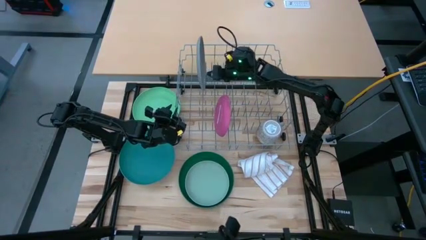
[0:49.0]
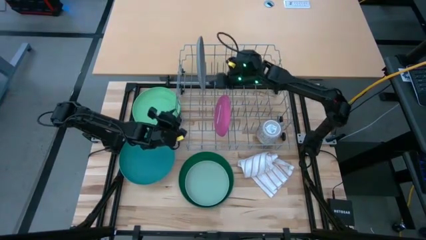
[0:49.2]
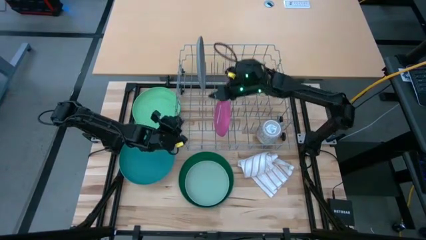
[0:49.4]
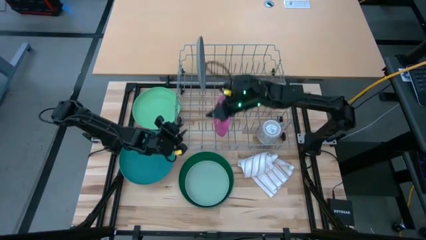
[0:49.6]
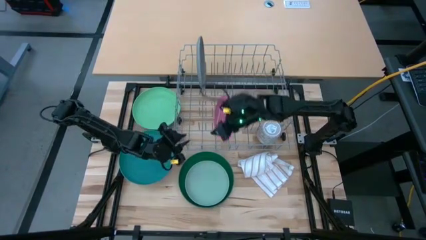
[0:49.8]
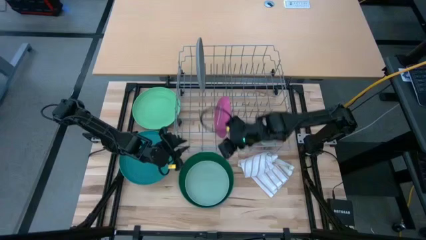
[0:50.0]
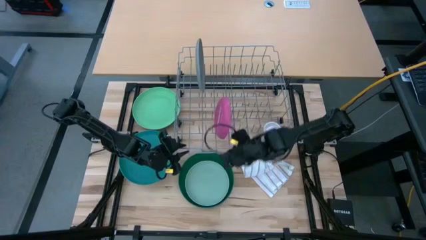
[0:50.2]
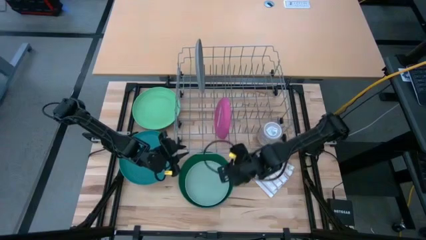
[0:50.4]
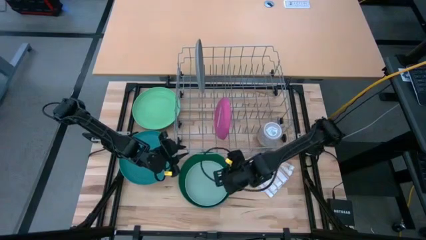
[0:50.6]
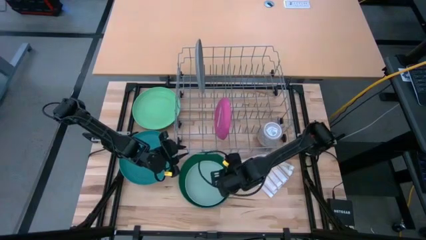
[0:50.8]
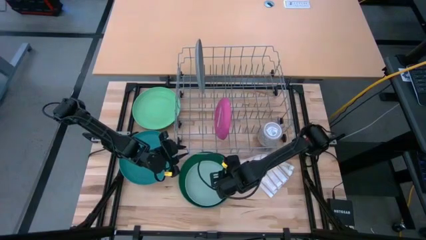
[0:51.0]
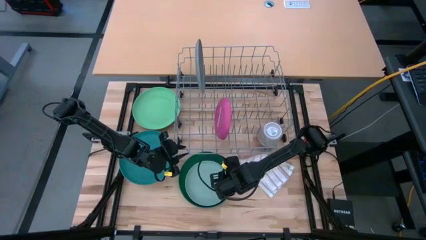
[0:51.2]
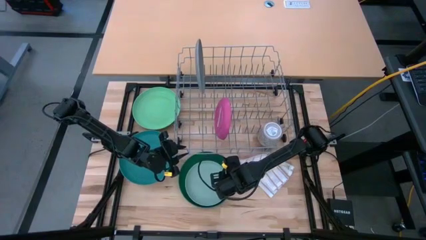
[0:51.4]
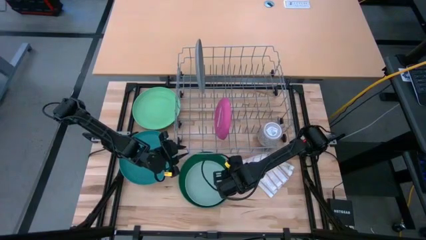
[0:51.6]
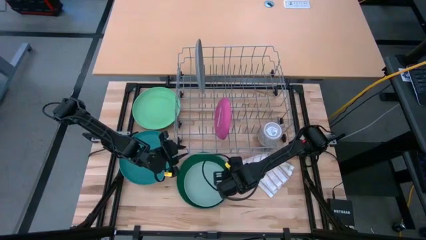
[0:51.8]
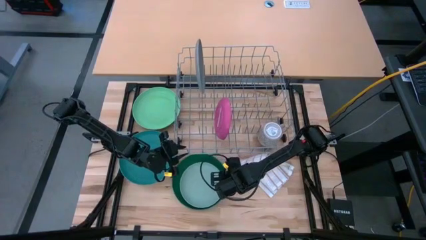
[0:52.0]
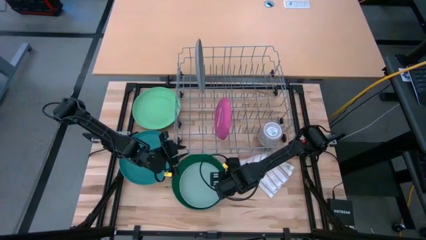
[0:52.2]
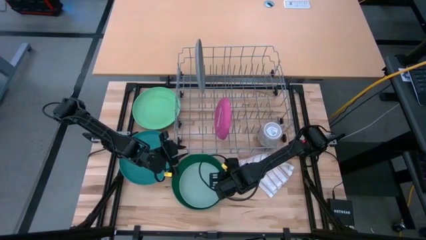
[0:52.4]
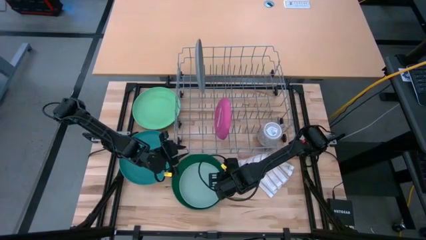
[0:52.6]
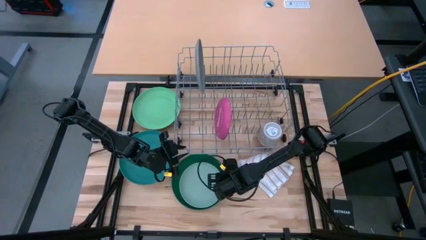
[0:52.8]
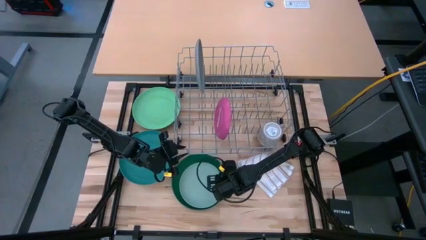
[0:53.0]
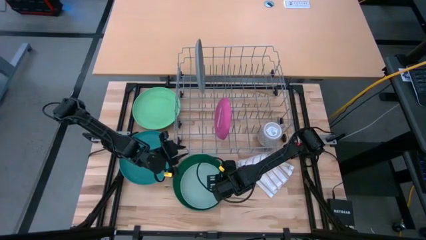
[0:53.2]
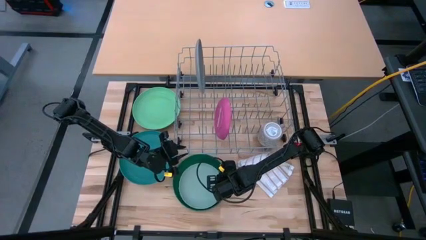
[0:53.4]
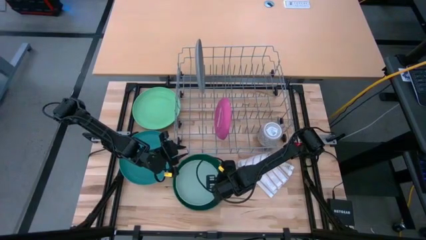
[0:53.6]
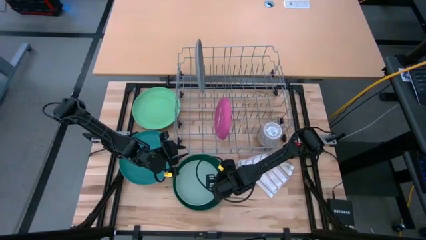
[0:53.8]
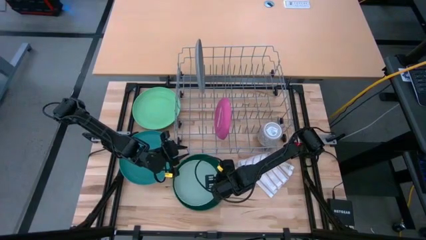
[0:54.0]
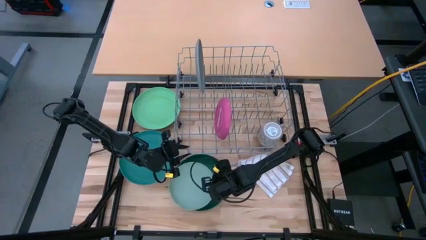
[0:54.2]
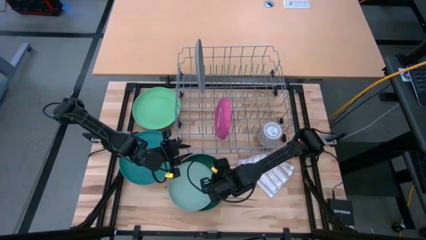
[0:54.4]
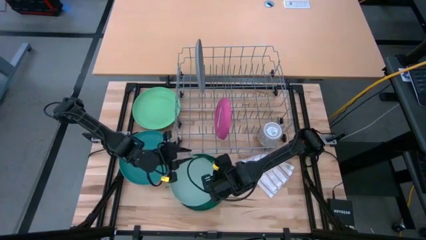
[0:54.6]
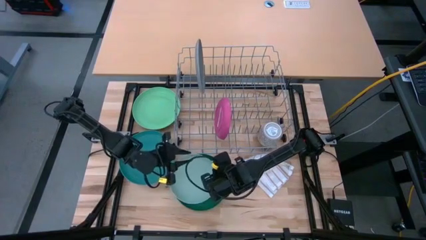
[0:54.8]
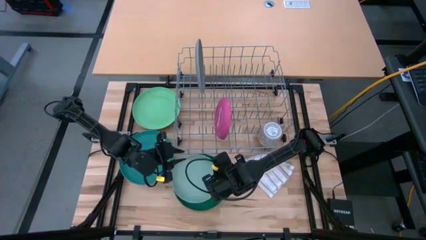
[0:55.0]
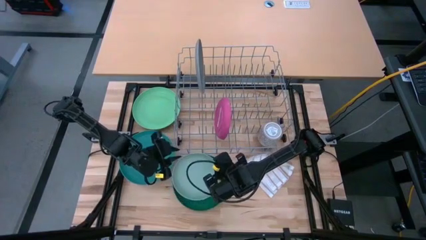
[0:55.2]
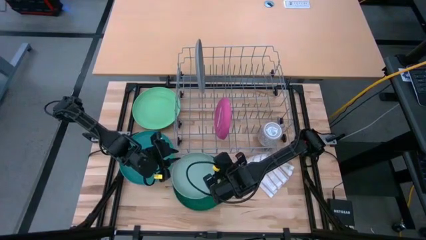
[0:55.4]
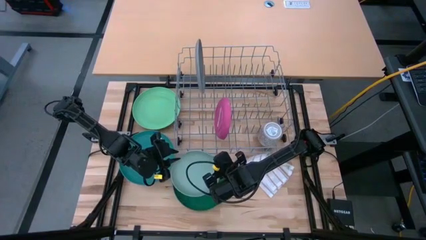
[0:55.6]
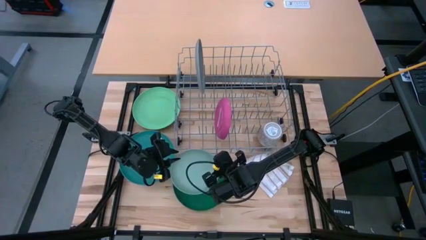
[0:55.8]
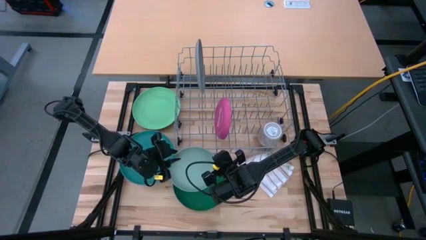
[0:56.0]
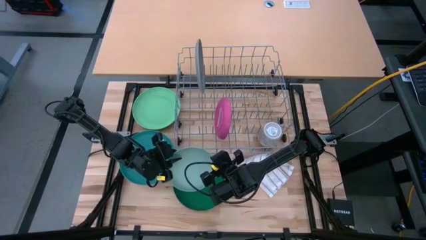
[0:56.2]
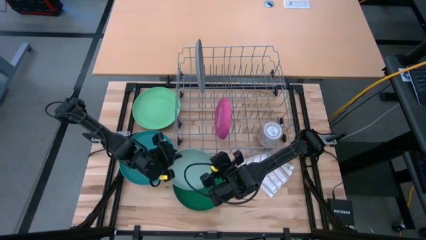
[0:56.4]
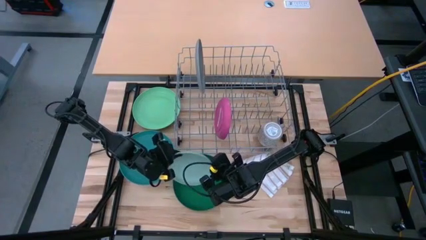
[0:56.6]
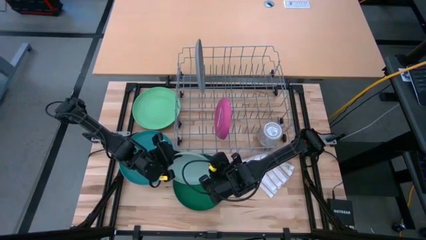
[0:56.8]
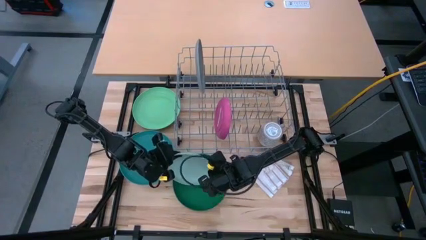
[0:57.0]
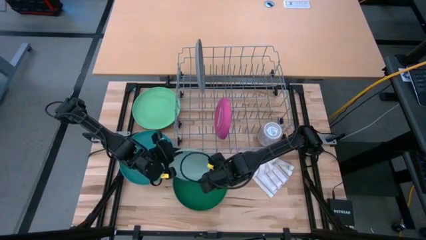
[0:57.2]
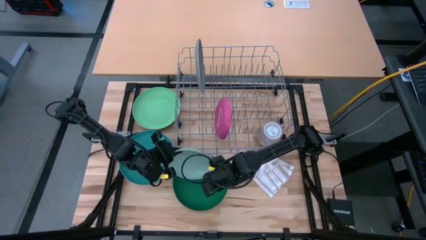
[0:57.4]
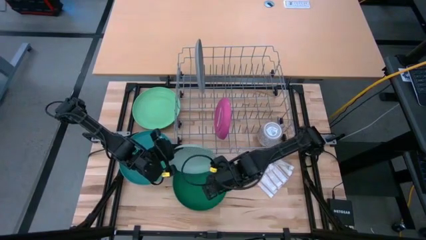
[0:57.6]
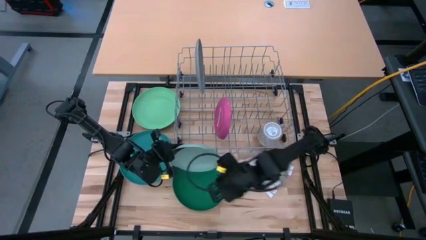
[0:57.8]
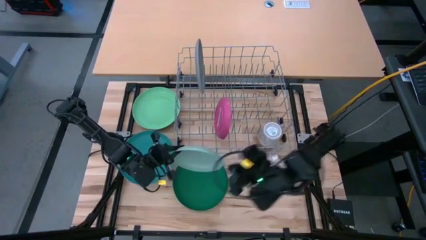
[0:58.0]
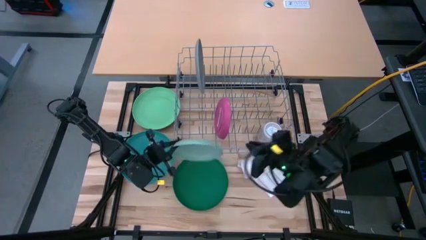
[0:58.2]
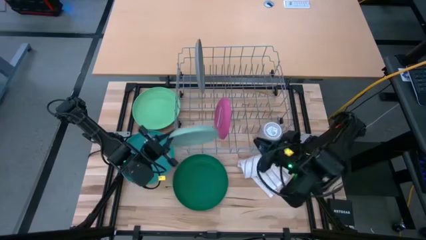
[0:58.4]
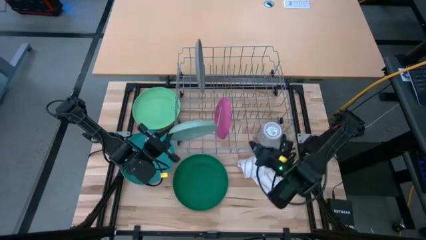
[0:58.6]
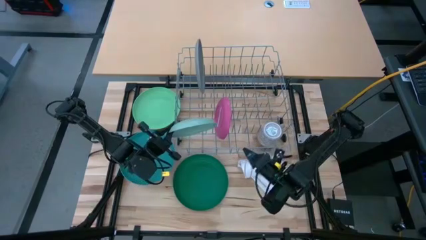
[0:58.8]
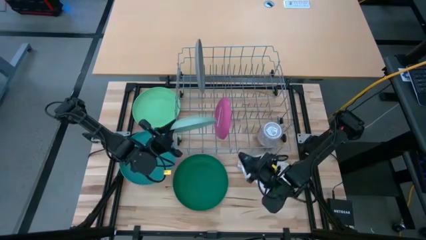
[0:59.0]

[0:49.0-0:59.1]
Task: Sort dishes
Put the light green plate in the dish rack
